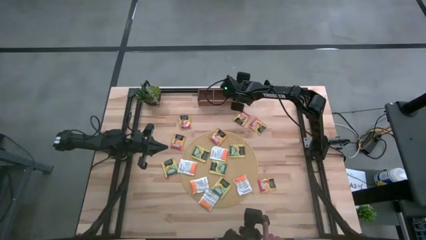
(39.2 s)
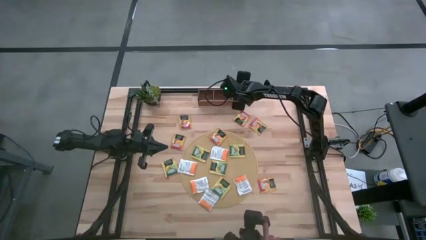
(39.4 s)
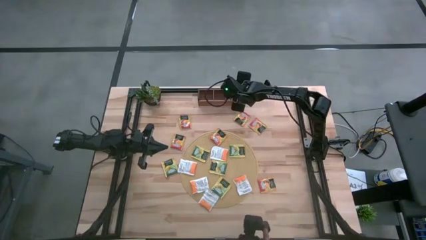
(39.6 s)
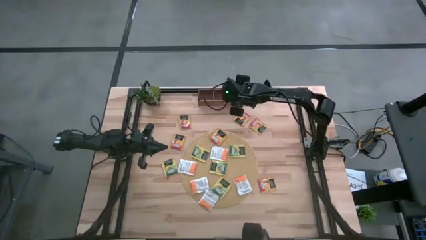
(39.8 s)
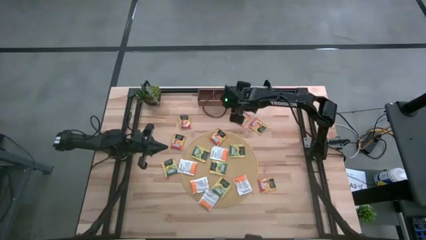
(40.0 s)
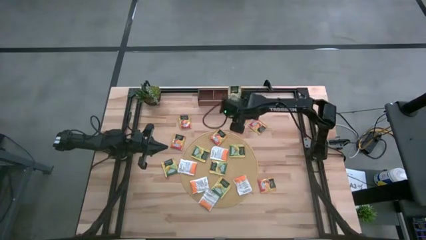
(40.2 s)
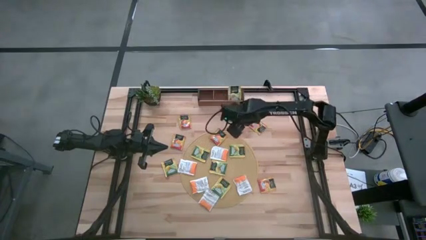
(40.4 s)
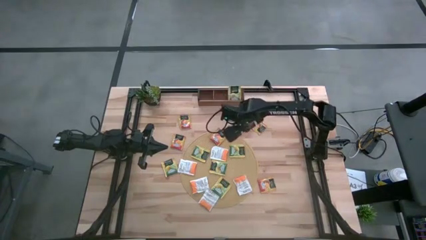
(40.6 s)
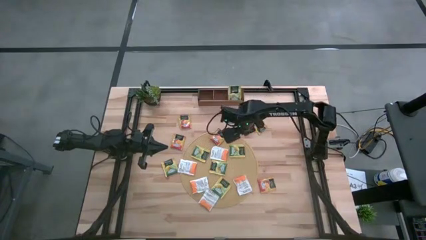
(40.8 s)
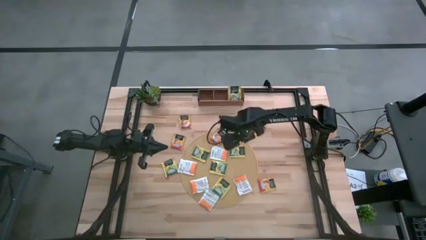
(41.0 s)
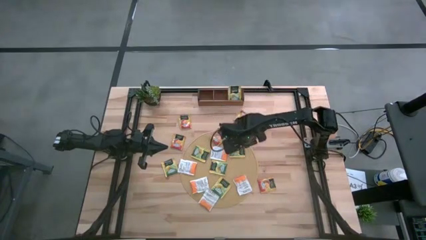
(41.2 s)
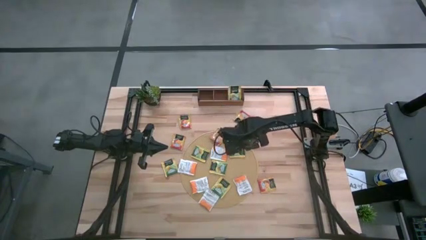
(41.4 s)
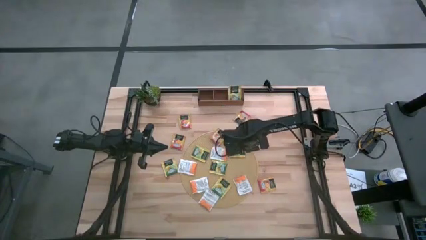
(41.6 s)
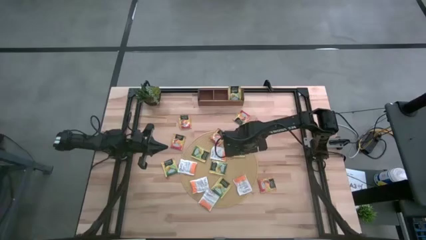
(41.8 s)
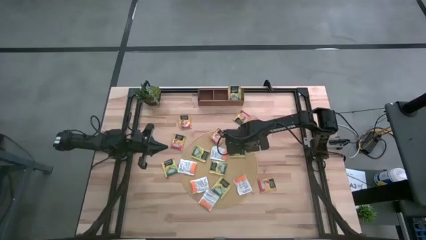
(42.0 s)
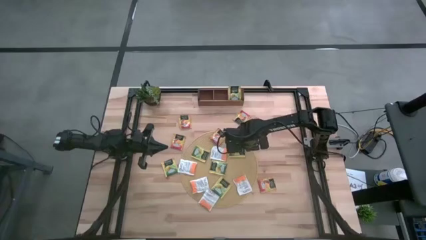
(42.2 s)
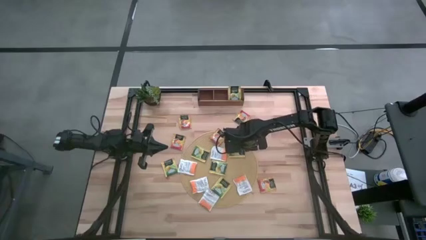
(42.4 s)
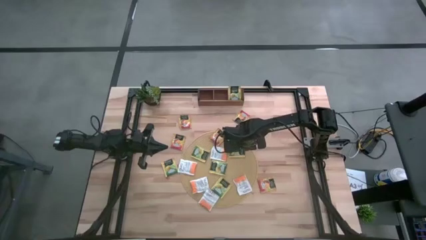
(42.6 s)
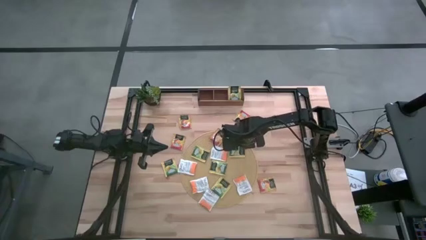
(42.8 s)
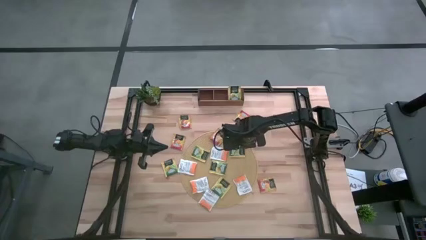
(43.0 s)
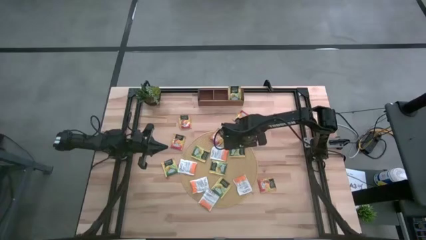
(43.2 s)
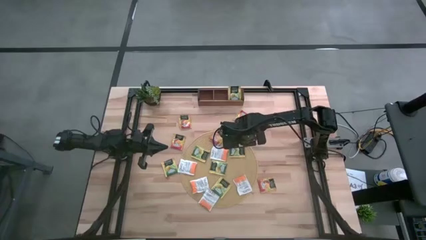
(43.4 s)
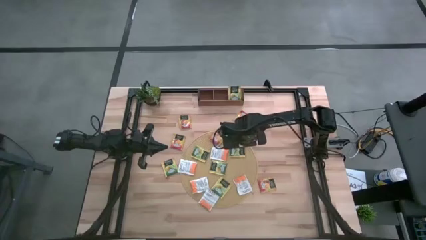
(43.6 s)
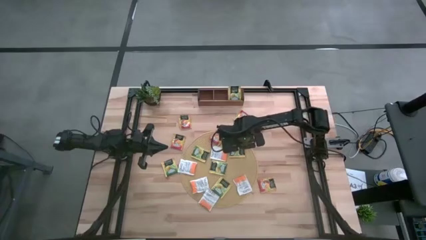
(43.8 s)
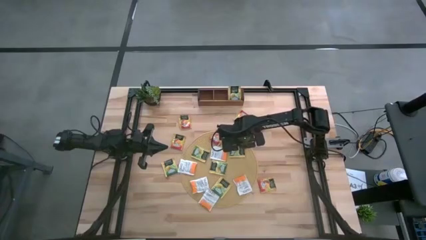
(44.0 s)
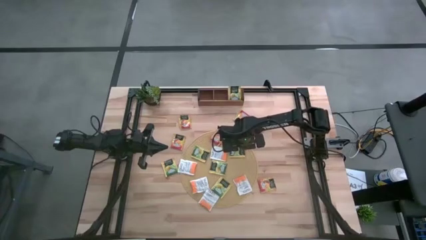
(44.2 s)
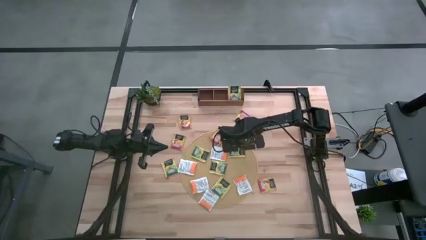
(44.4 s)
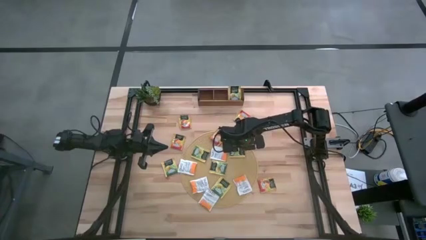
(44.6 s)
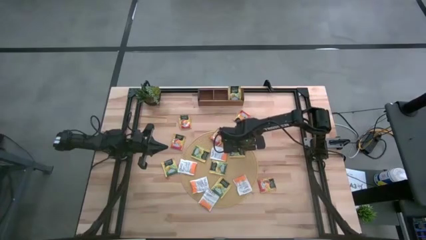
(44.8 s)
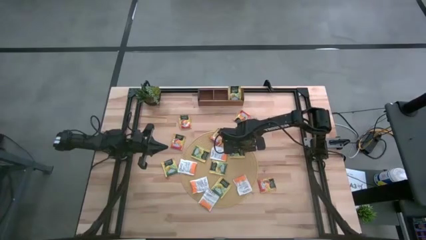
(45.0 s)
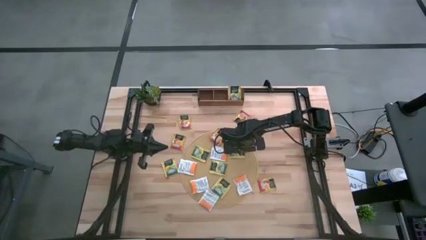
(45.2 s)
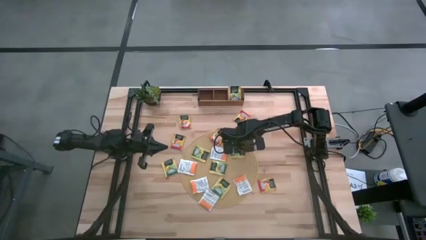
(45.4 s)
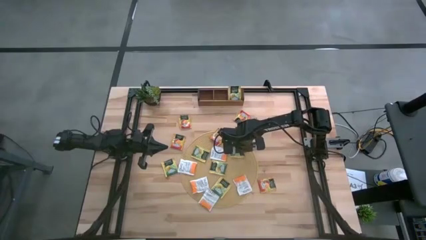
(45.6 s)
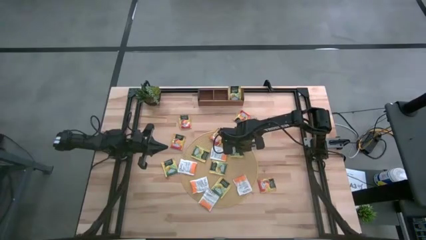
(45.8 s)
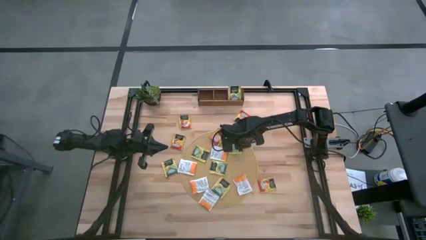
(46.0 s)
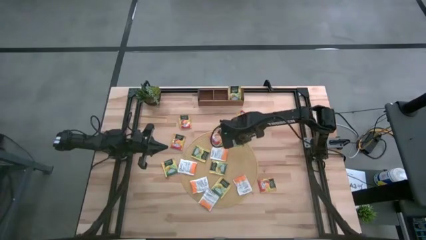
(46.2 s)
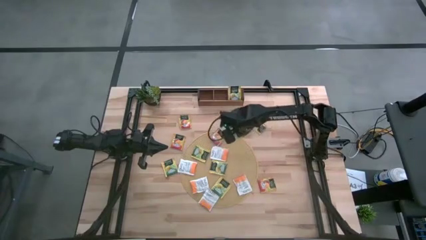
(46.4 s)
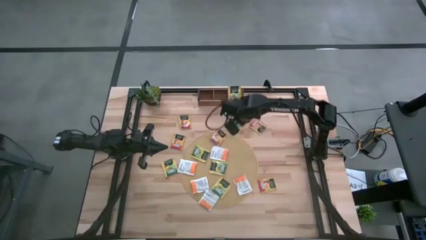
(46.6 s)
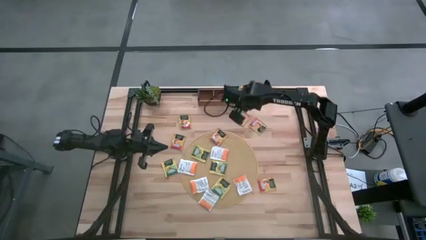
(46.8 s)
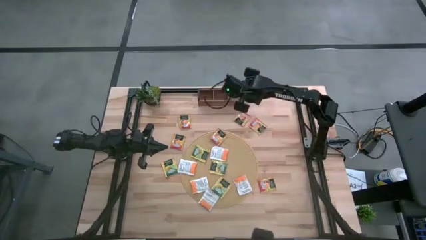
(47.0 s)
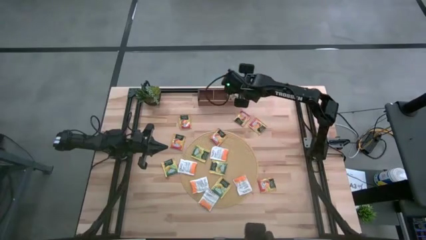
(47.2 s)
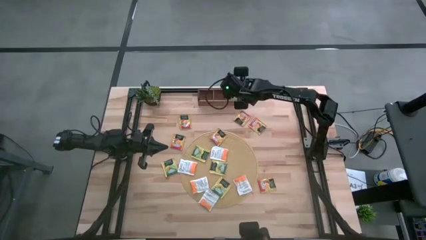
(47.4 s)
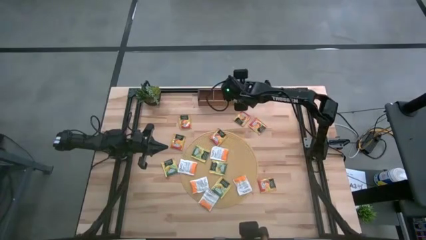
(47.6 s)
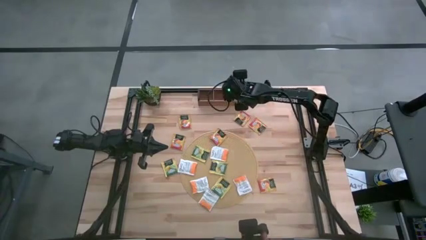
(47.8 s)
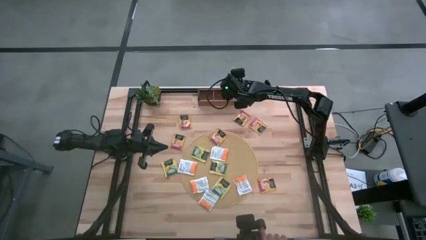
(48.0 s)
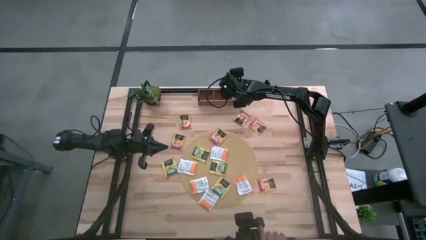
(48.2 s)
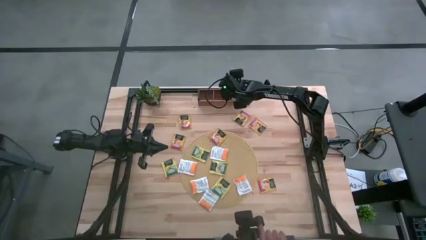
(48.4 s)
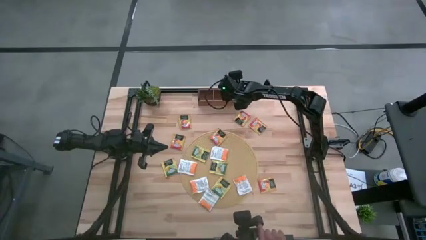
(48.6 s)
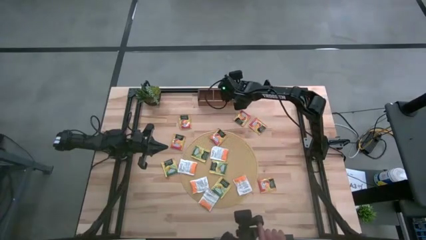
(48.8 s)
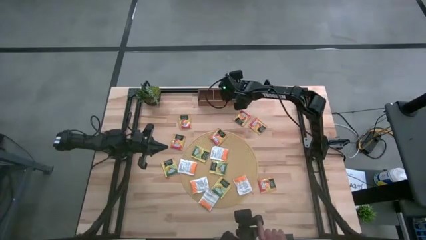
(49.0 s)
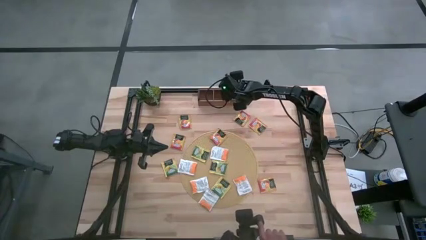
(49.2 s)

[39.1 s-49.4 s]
Task: Pick & Place Tea
Put the yellow tea bag into the right section of the wooden organizer

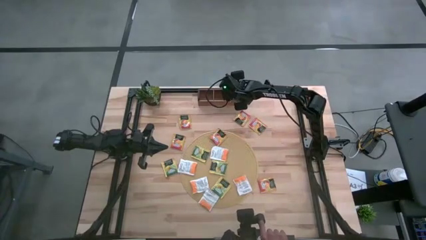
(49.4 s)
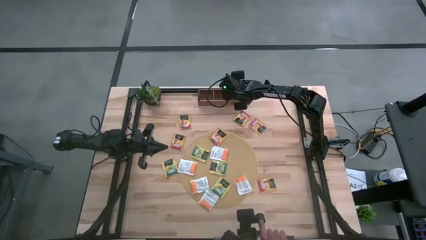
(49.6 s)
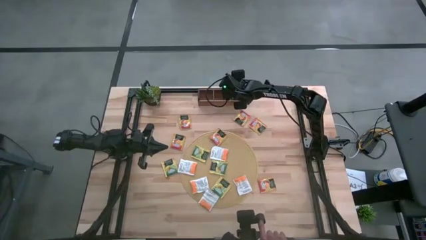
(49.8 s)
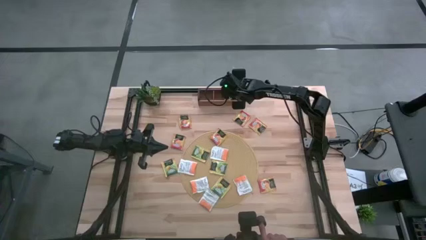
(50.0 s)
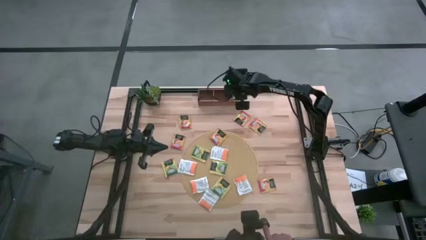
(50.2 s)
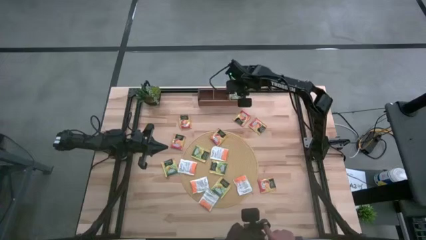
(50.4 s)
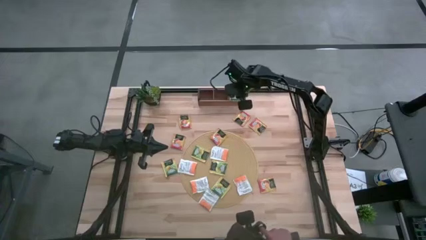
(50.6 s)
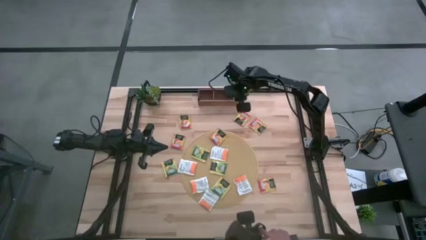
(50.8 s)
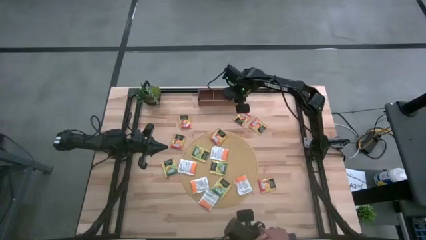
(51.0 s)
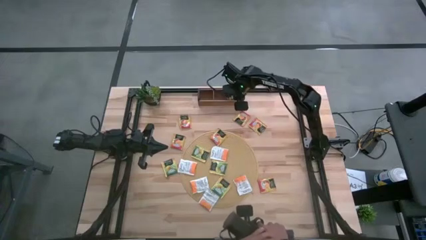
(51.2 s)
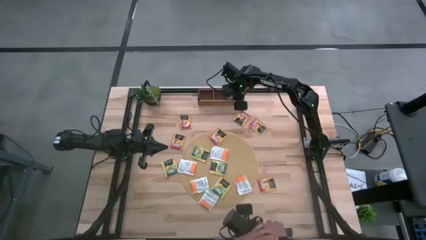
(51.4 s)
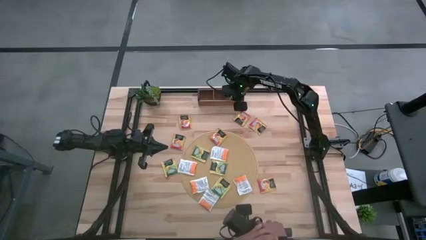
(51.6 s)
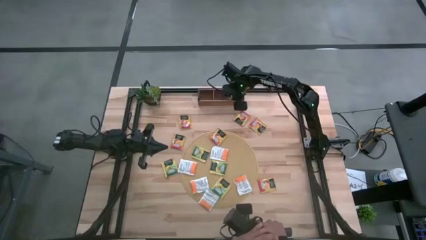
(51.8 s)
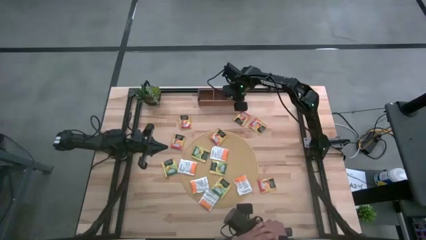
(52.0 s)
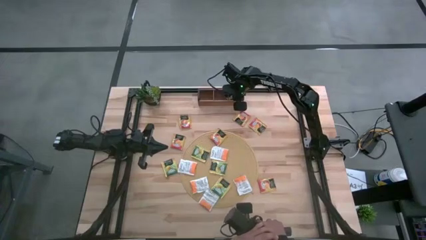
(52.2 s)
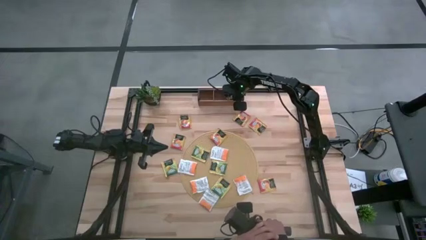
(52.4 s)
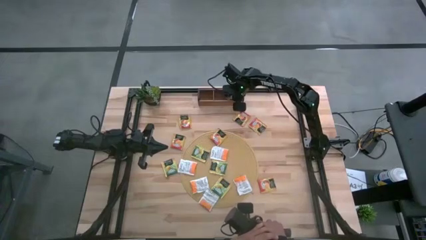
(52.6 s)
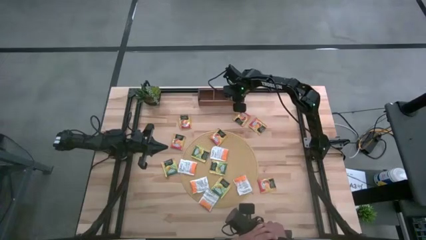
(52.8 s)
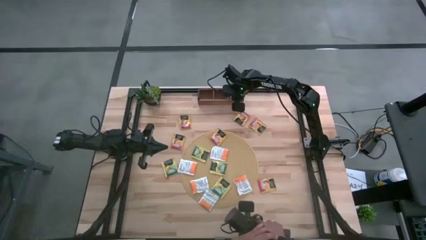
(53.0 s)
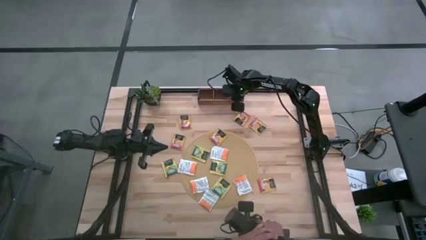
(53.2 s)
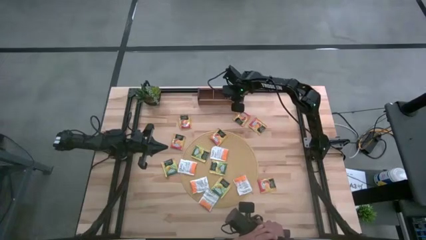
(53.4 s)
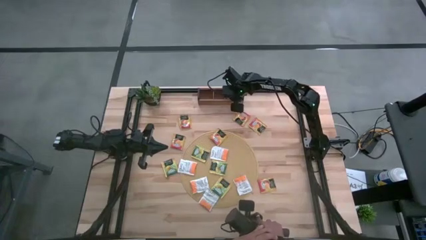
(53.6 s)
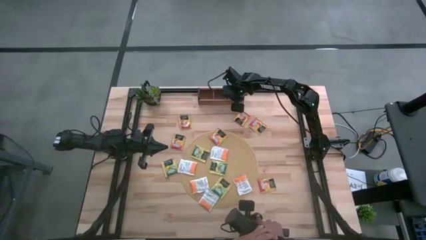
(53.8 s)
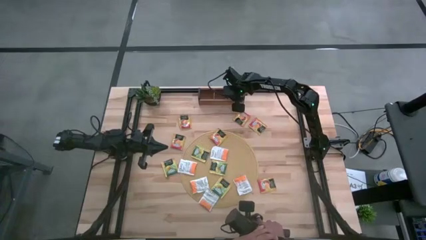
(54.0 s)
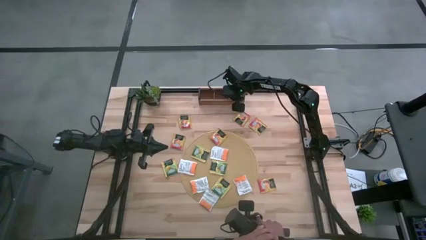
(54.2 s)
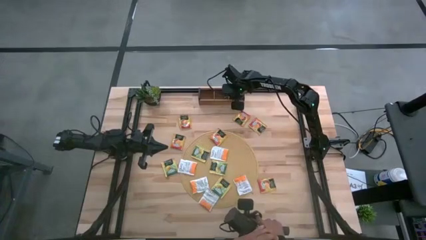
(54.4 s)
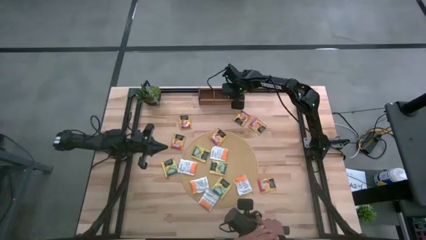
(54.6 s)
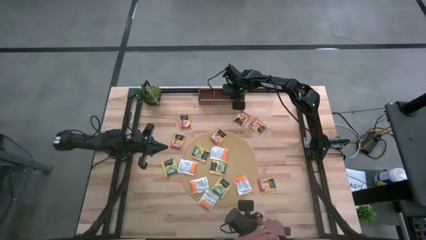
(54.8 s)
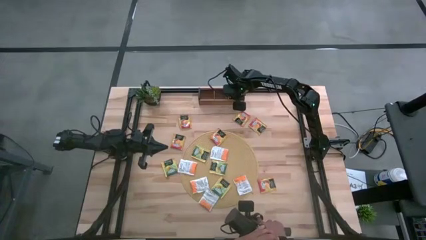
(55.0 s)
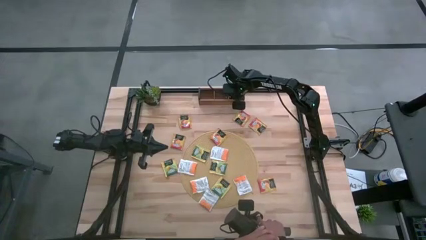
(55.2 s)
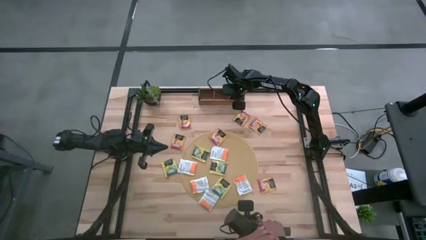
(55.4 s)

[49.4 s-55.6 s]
Adjust the yellow tea bags in the right section of the wooden organizer
